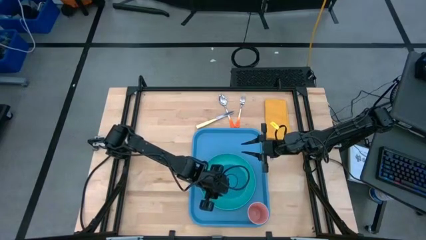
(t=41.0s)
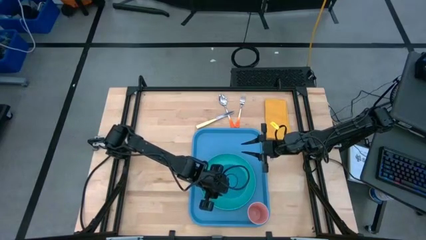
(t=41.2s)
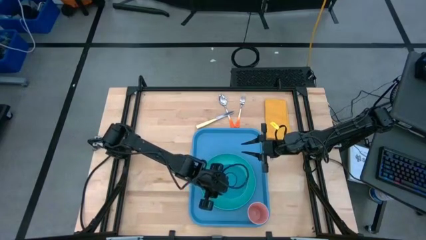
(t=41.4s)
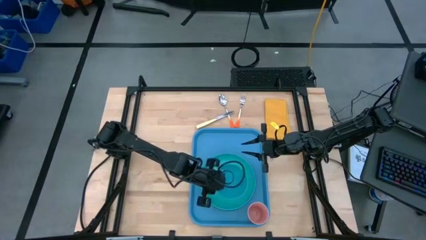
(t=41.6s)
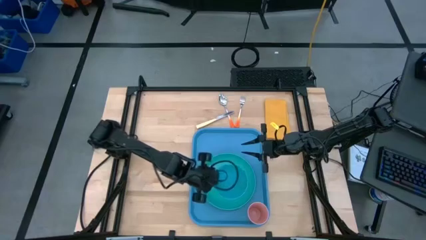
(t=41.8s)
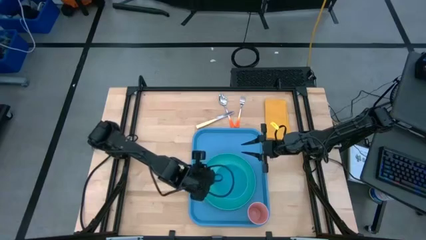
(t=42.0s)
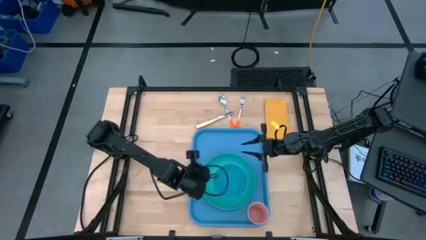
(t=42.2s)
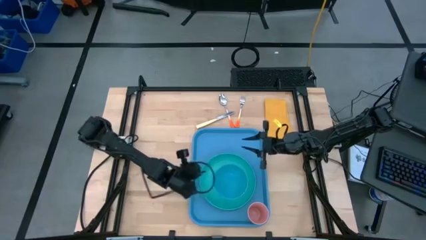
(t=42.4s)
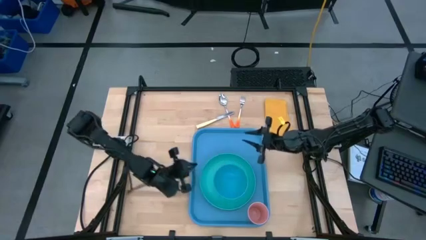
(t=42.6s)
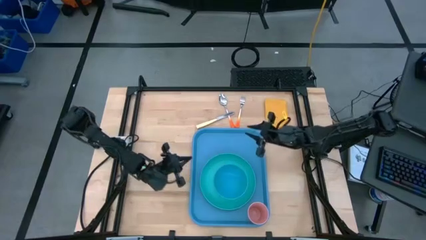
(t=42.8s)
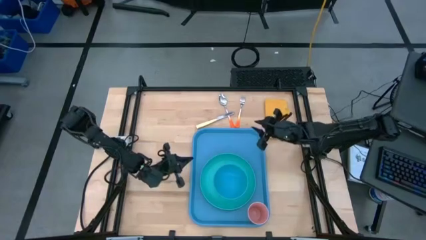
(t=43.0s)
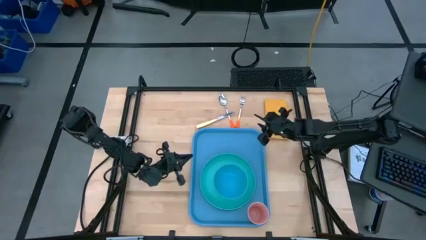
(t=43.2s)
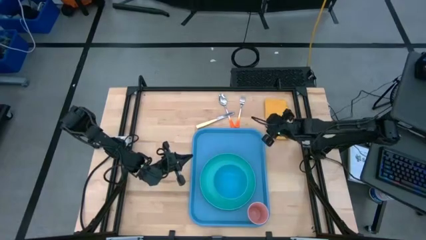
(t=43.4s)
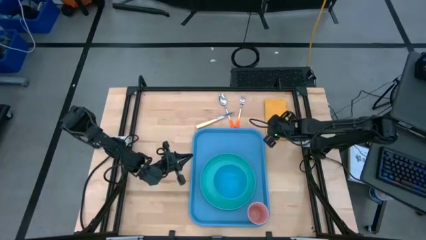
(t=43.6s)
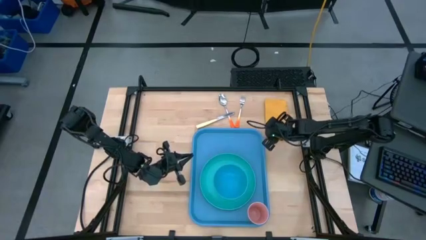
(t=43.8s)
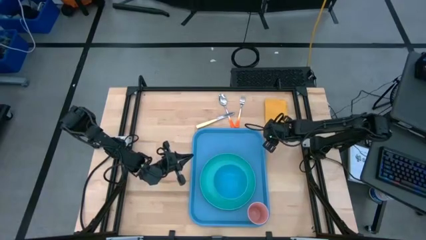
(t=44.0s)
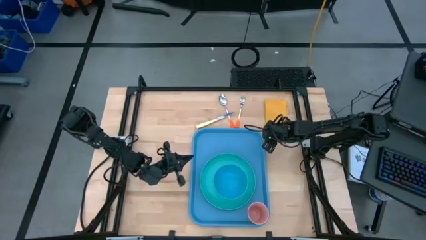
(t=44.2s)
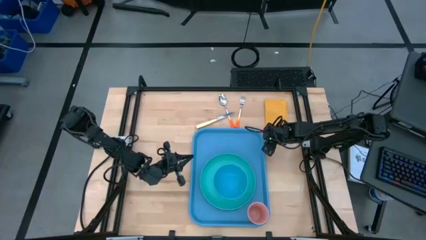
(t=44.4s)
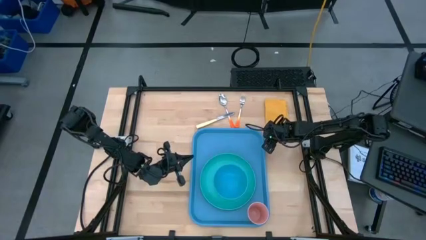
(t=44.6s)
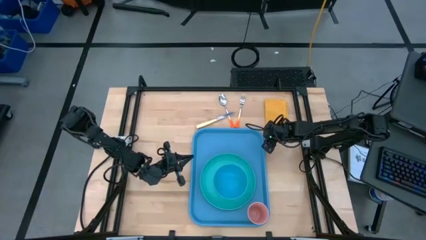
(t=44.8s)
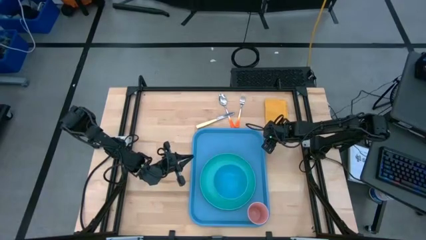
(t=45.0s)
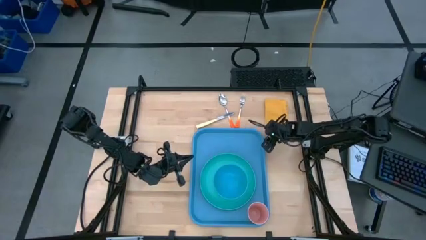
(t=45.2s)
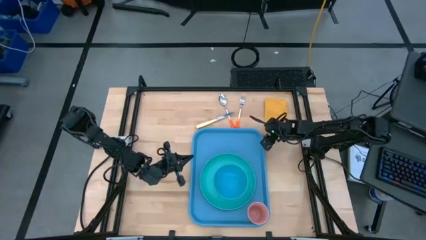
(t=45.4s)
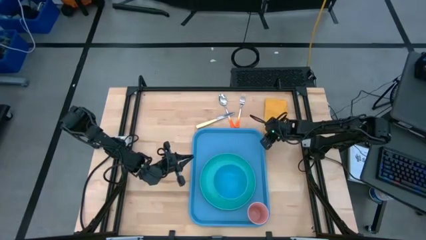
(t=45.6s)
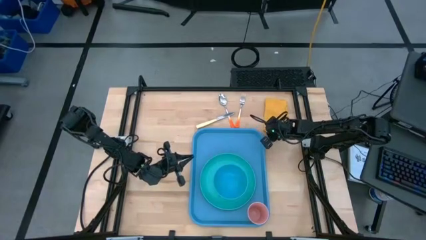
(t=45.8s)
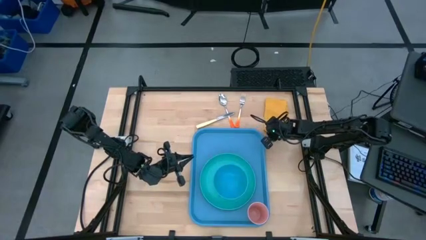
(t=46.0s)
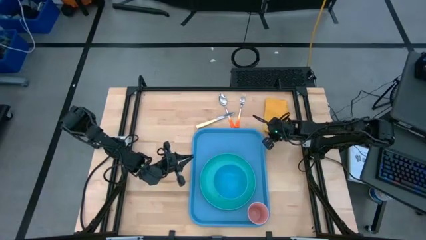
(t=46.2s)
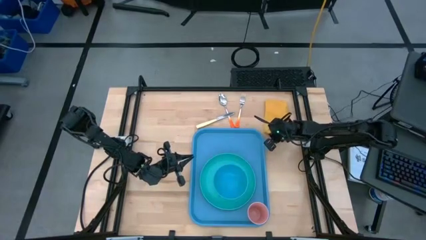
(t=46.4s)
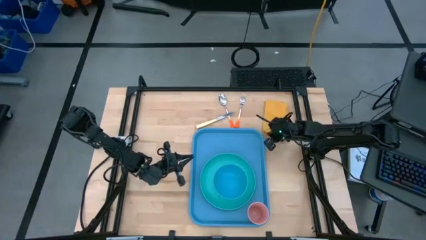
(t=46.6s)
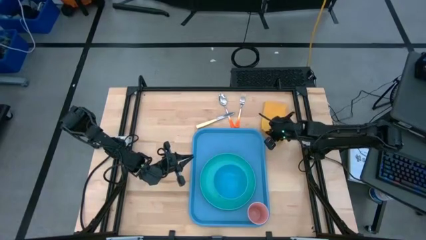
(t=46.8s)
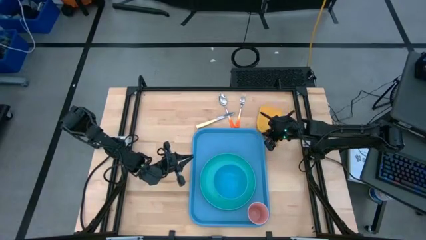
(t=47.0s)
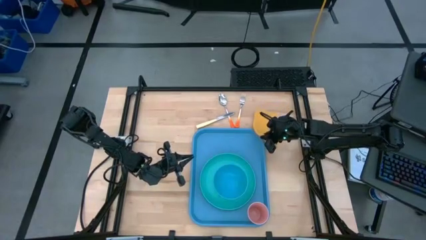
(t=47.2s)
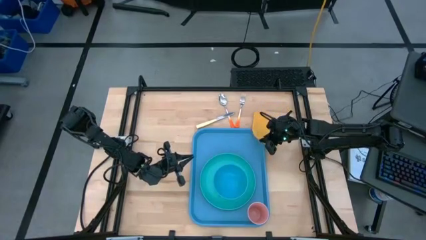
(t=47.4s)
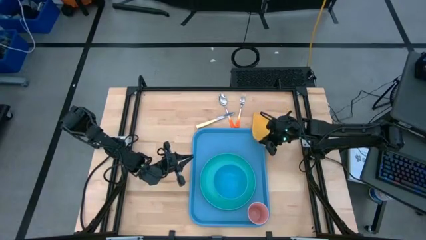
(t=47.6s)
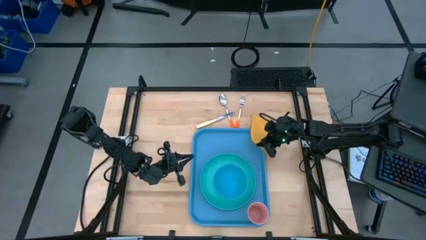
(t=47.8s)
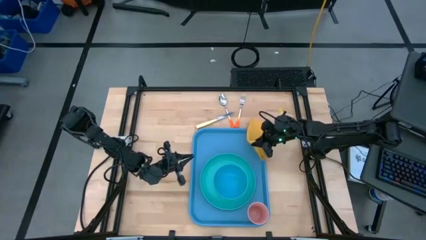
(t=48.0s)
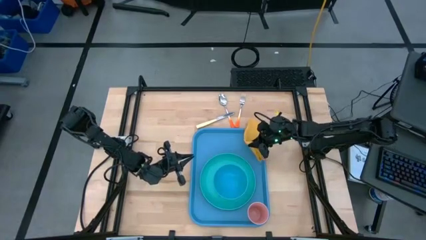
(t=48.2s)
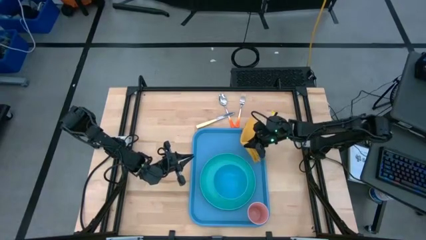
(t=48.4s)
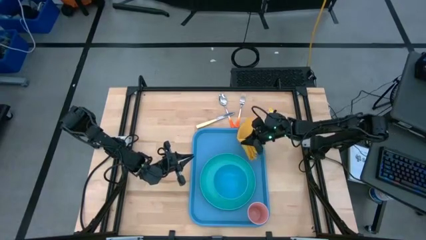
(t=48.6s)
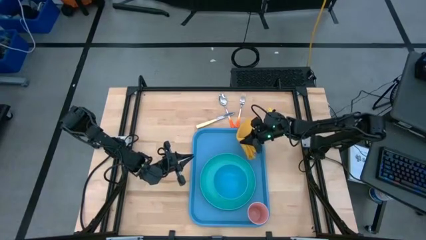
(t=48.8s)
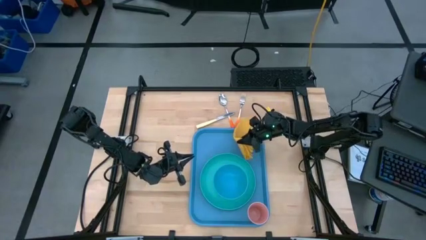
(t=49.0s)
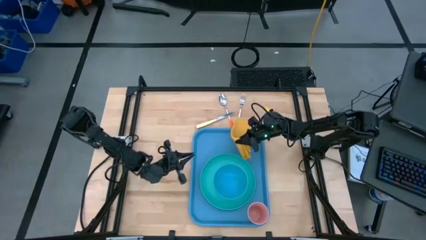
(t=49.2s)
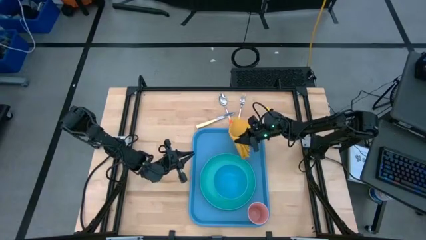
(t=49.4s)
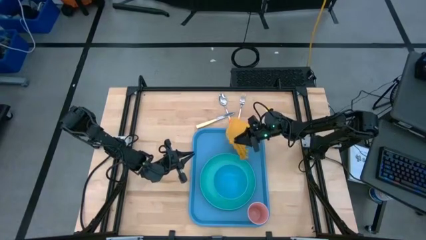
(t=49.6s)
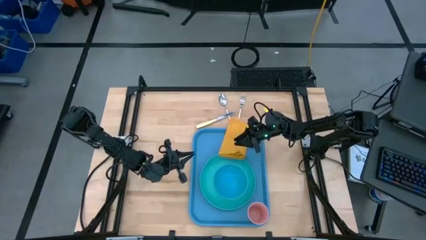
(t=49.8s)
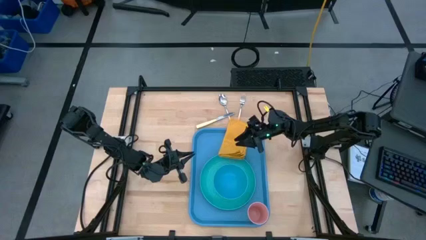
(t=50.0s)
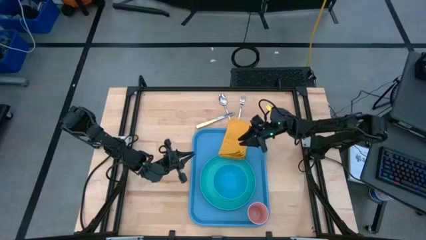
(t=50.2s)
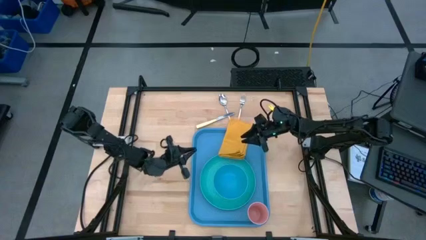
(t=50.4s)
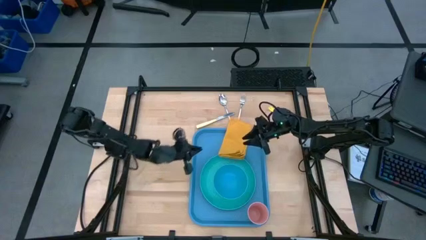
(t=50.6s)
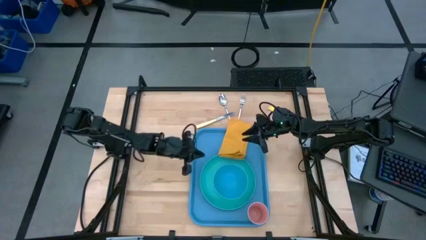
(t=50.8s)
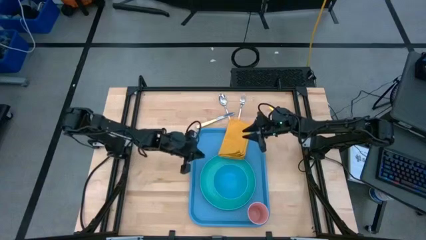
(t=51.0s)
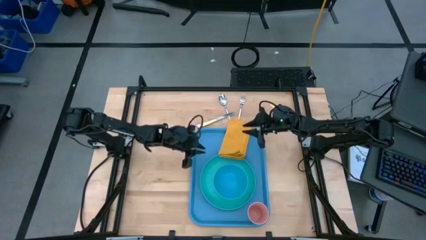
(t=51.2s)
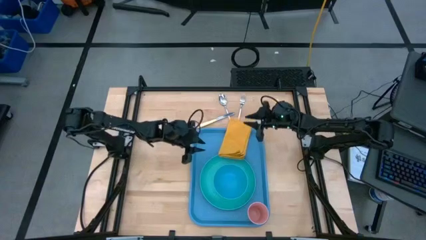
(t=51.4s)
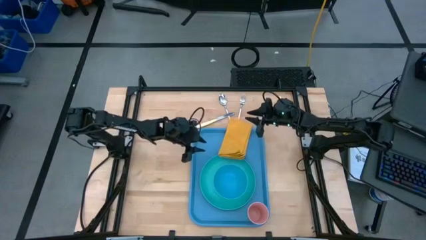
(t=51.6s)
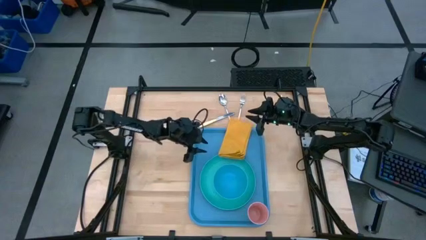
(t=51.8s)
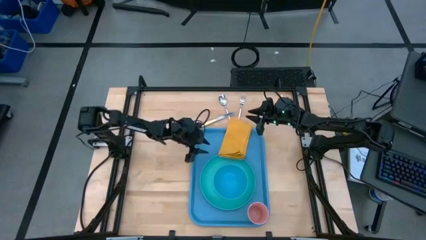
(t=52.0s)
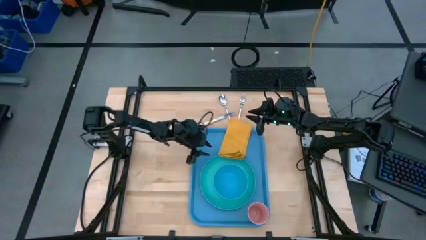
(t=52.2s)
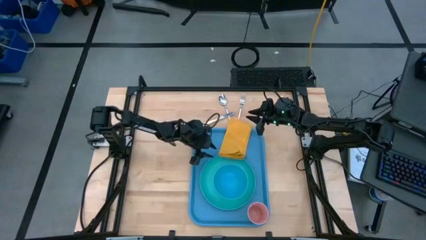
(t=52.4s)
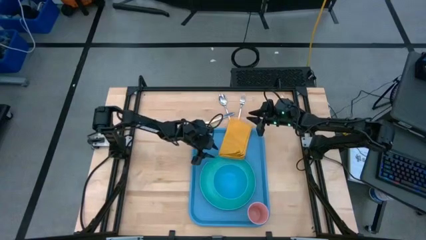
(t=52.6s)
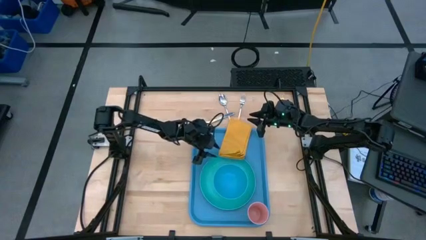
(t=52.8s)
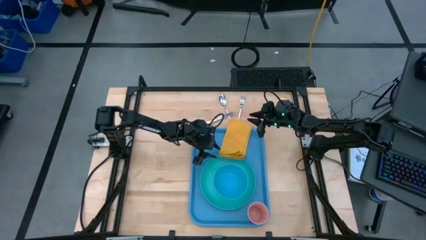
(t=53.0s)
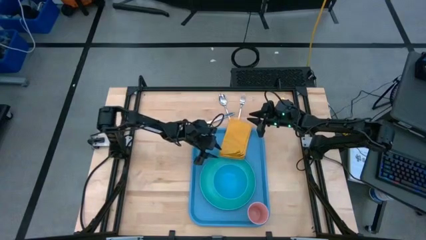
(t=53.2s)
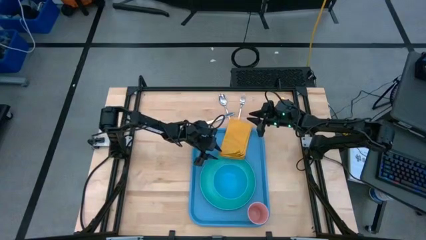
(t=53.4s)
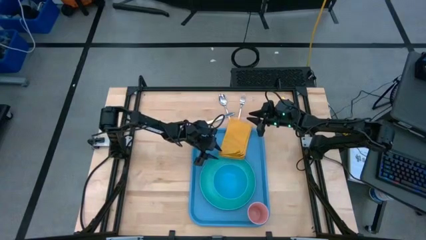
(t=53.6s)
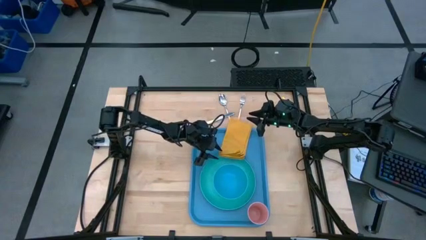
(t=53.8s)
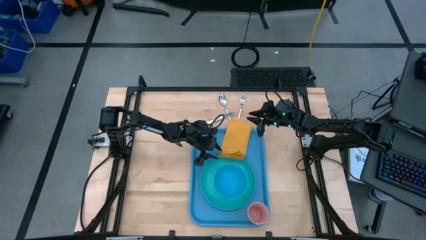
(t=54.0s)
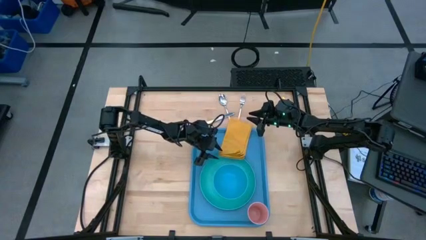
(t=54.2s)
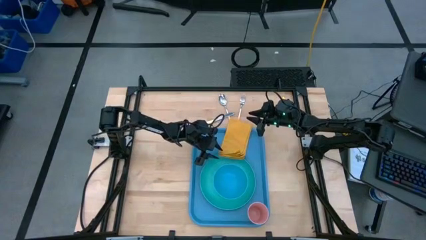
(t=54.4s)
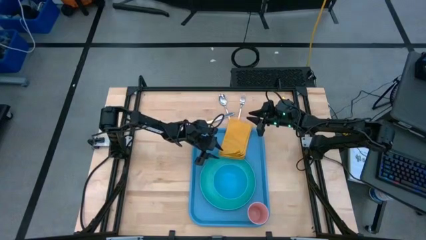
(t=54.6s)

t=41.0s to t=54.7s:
Task: Set up tray
Put the yellow napkin top the left of the light blue plate on the blue serving tray
